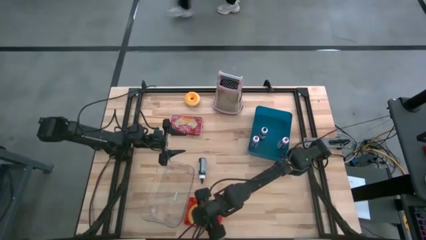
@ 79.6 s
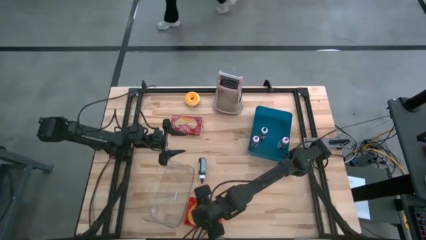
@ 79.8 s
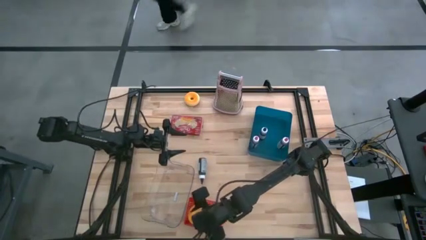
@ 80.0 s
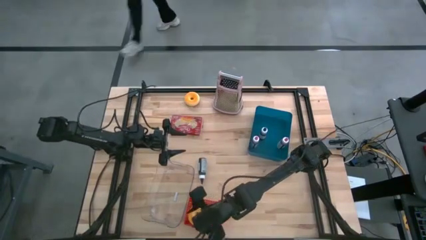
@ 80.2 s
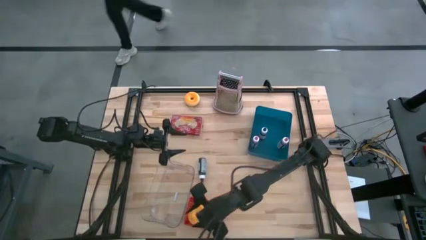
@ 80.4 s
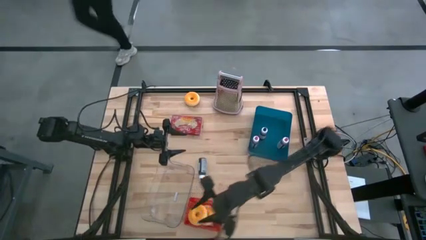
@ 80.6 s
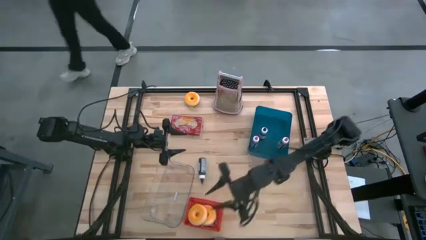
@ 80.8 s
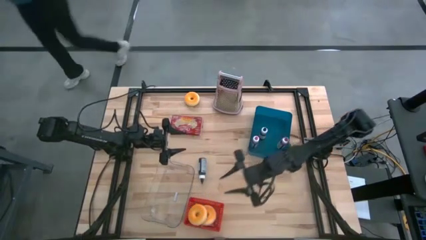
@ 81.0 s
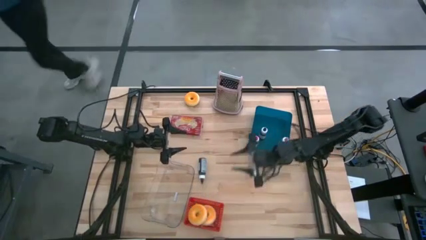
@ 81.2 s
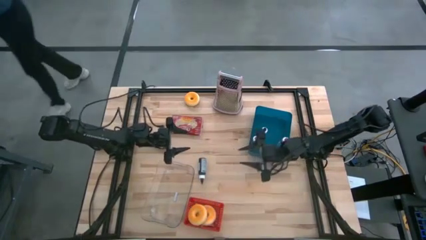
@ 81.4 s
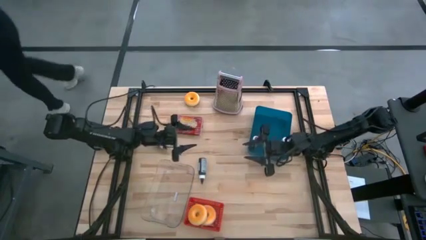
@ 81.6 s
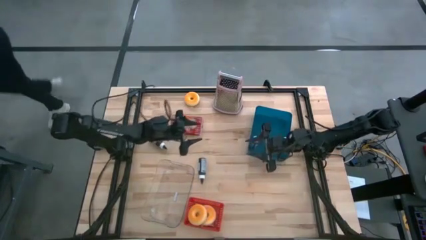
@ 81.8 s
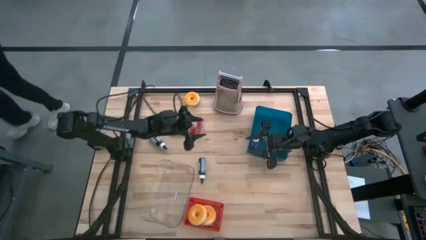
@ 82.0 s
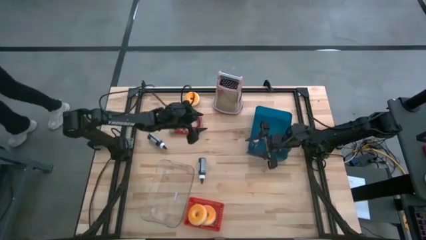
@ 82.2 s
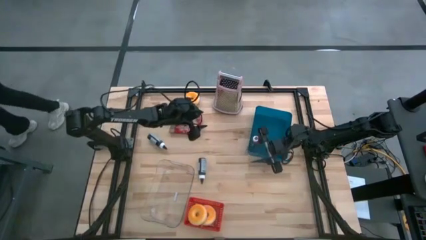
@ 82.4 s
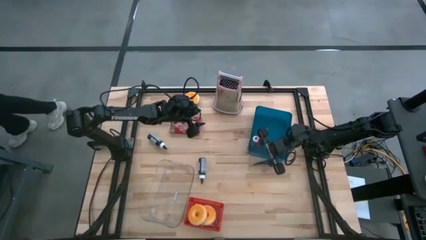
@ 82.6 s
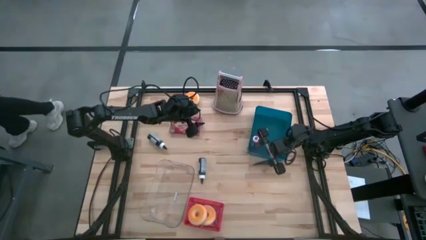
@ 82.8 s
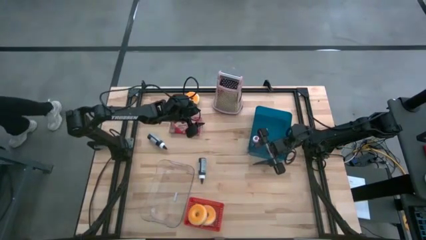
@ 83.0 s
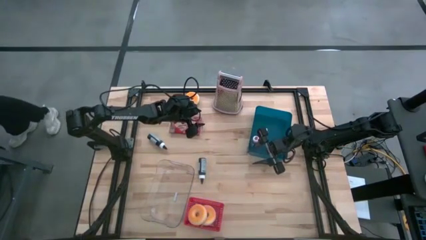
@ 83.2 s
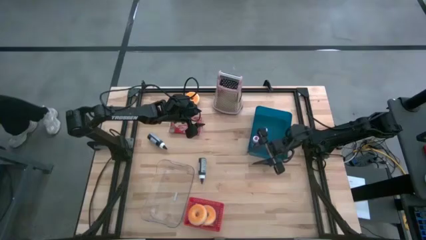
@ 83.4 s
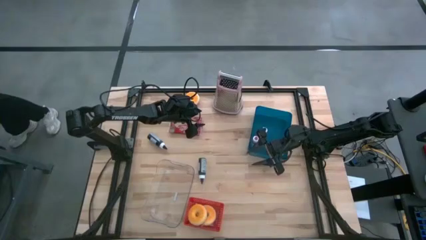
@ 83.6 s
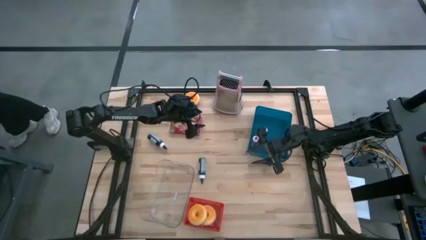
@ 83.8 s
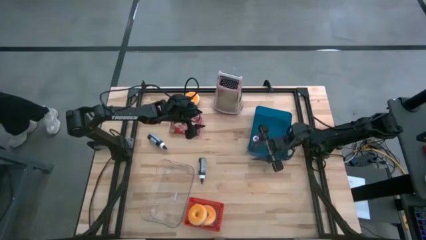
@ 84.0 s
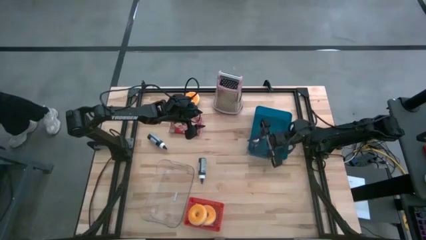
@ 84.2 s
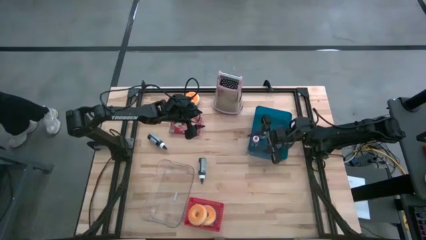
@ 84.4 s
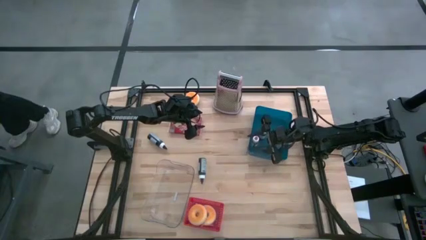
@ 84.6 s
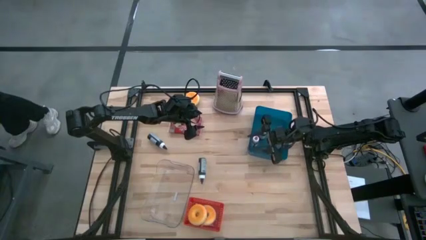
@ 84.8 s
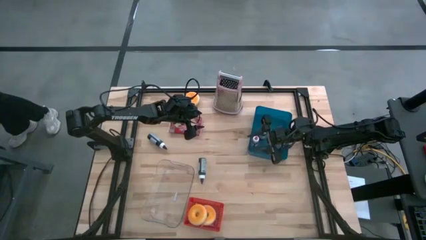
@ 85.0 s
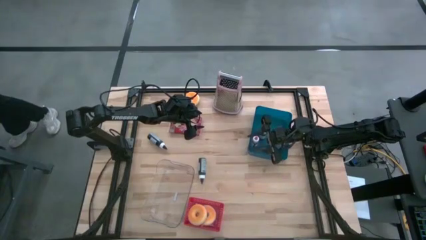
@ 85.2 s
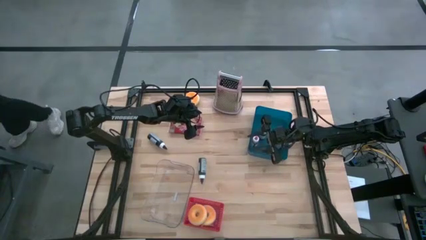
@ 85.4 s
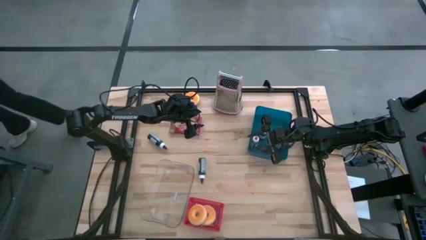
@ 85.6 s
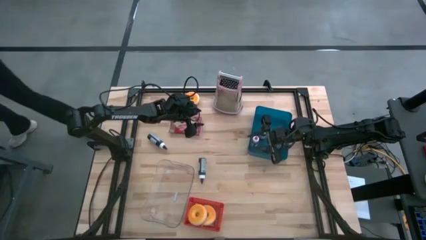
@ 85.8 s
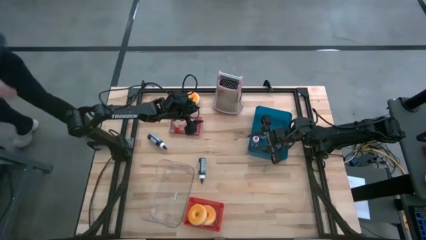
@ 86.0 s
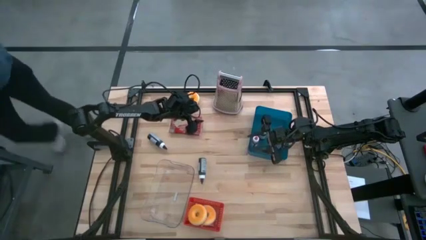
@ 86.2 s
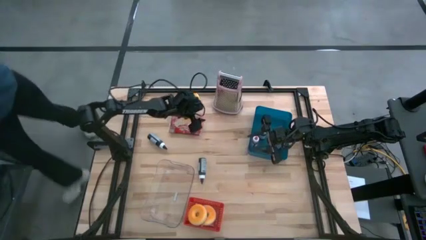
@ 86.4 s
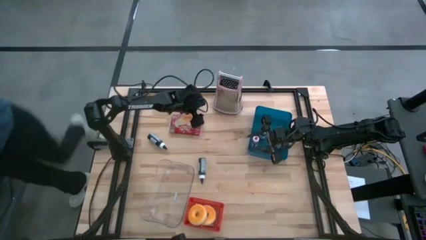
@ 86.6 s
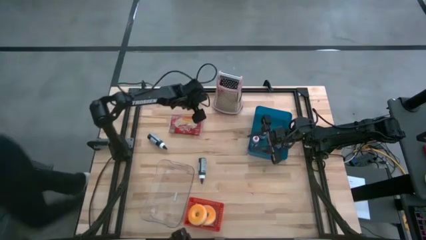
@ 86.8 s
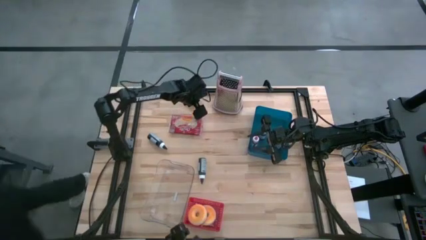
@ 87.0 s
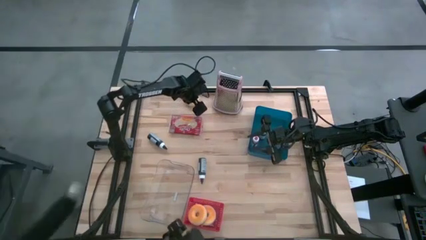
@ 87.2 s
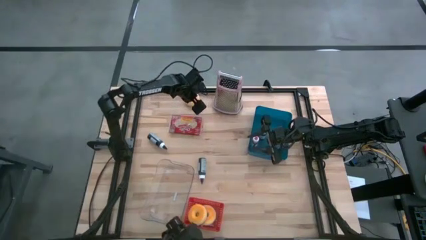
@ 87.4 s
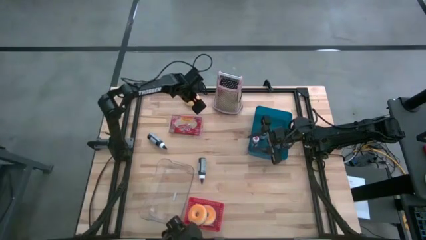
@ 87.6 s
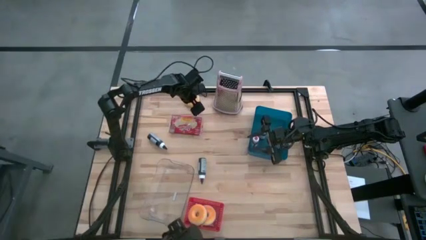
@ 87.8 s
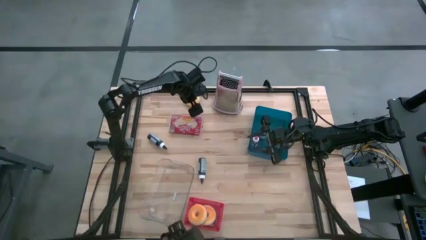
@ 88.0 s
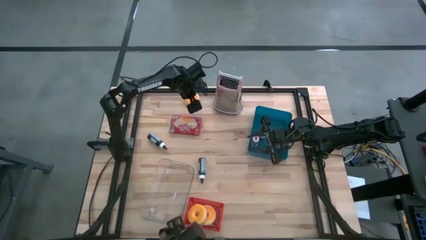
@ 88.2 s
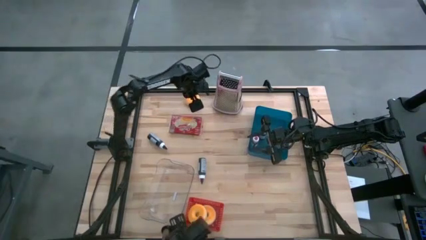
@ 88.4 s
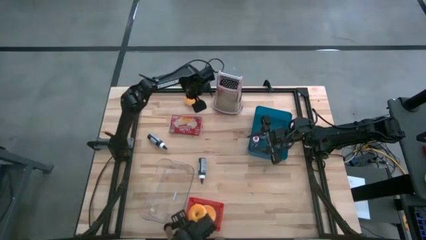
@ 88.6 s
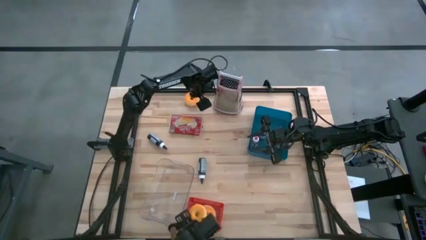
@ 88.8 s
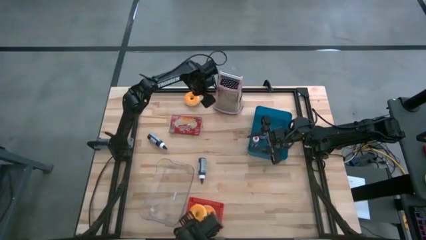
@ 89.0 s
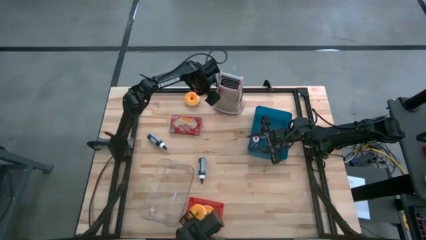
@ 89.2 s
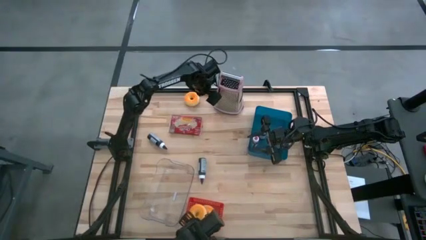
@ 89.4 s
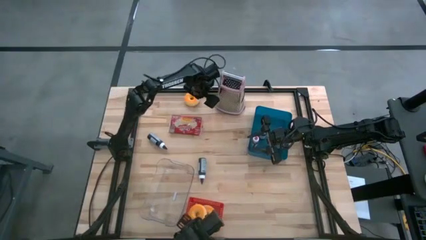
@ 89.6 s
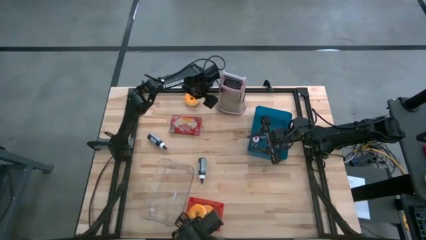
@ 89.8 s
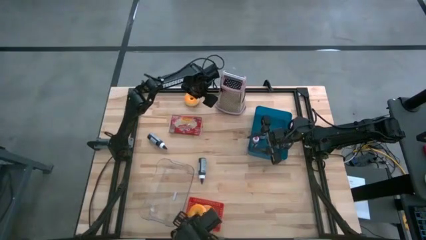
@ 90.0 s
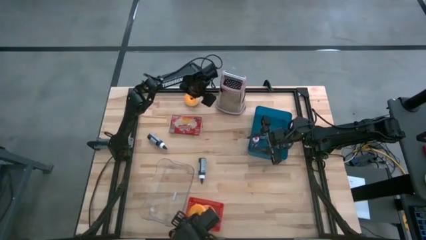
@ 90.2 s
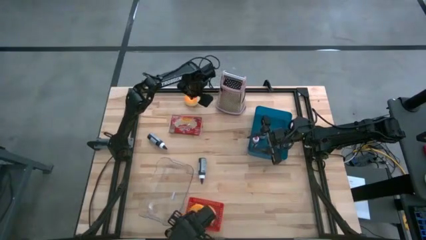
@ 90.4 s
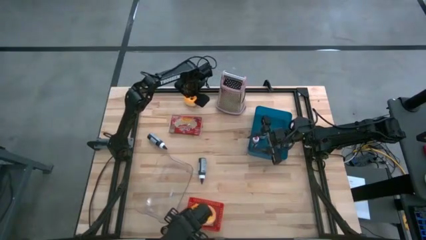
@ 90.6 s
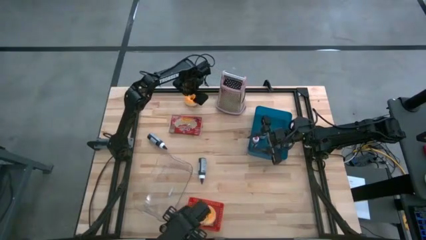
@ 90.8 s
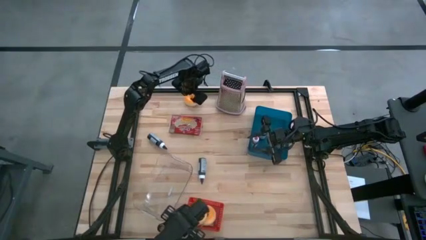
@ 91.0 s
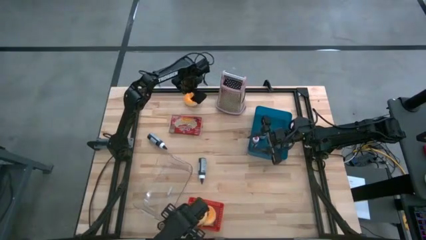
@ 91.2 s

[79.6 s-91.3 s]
Task: Pick & Place Food Item
Put the orange donut into the red bin

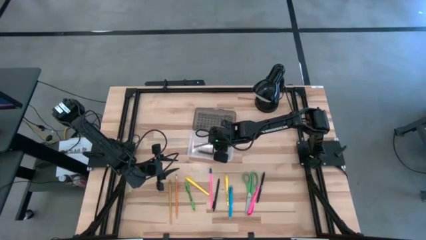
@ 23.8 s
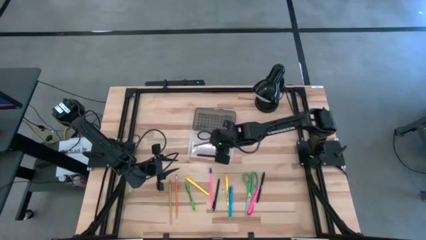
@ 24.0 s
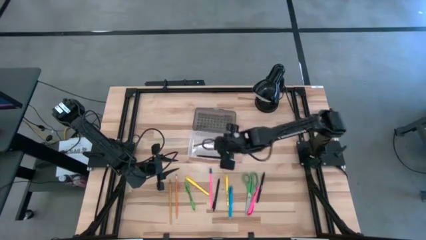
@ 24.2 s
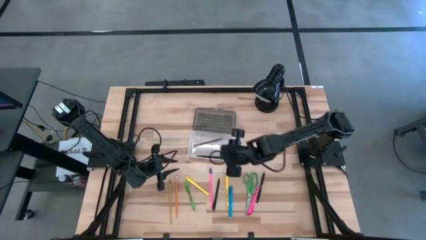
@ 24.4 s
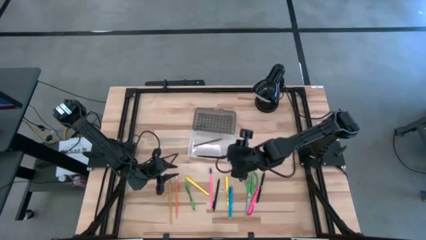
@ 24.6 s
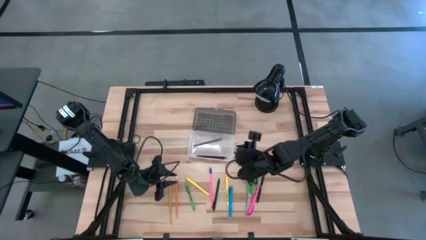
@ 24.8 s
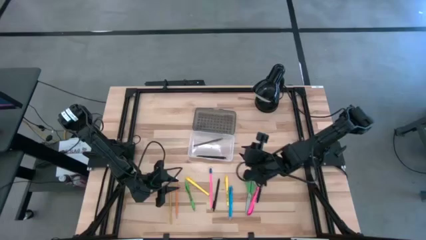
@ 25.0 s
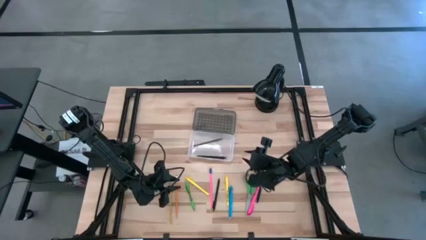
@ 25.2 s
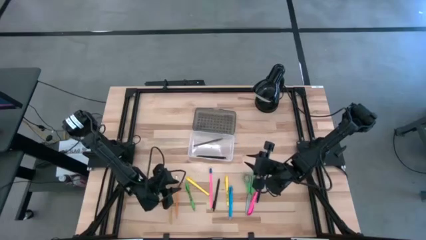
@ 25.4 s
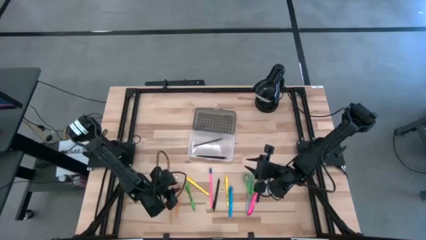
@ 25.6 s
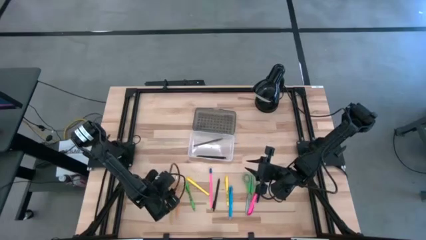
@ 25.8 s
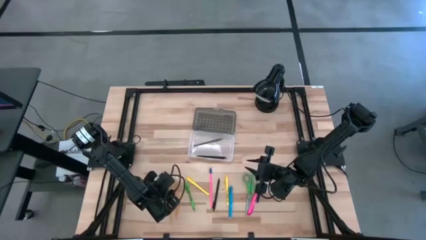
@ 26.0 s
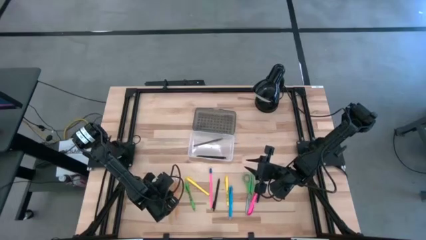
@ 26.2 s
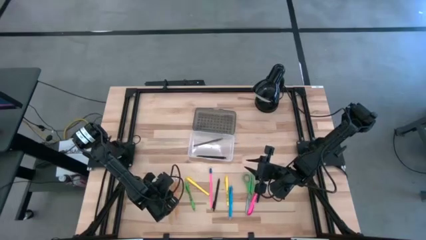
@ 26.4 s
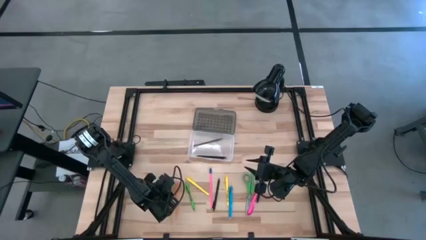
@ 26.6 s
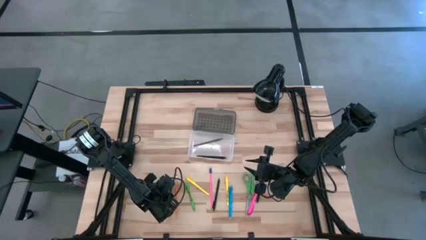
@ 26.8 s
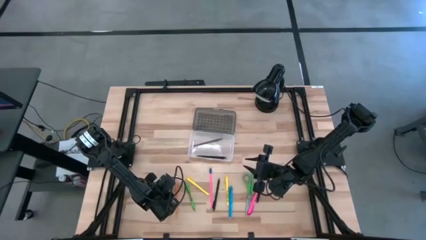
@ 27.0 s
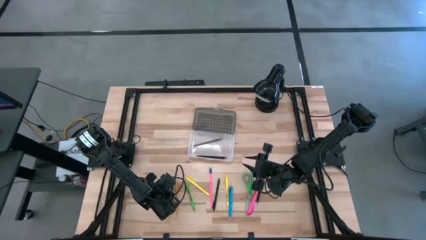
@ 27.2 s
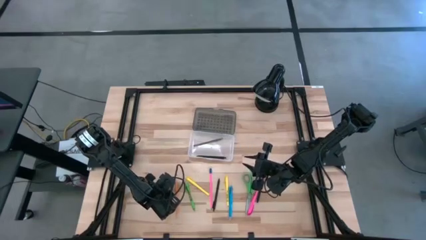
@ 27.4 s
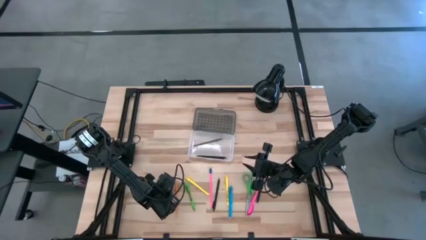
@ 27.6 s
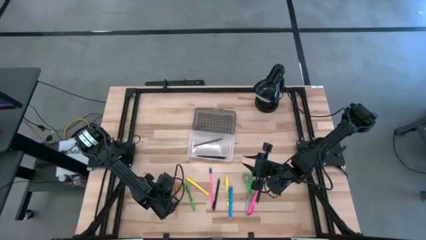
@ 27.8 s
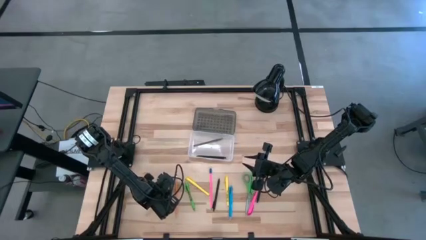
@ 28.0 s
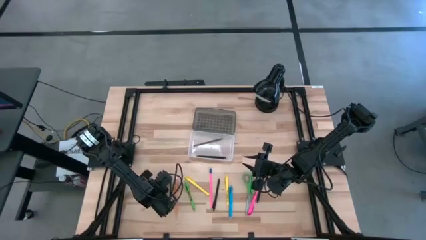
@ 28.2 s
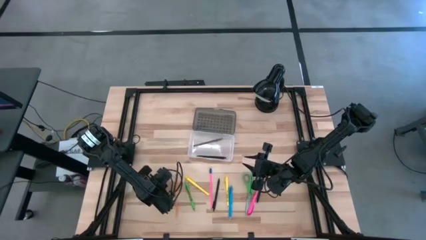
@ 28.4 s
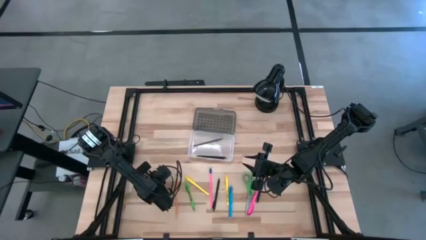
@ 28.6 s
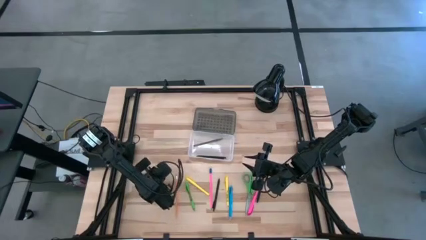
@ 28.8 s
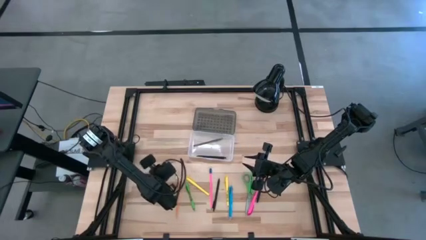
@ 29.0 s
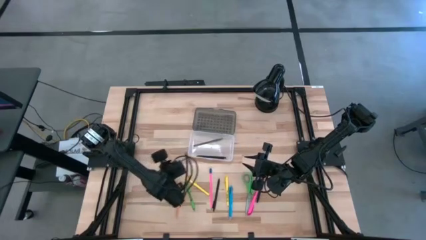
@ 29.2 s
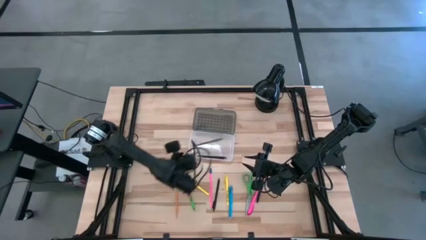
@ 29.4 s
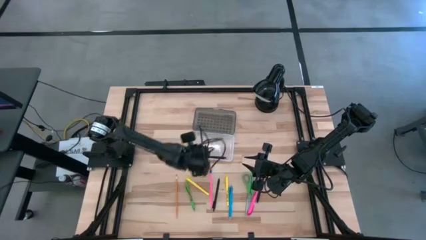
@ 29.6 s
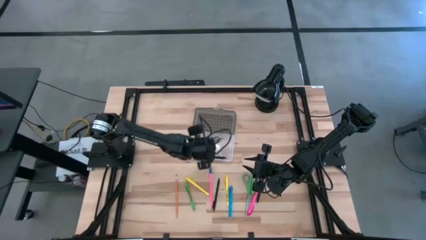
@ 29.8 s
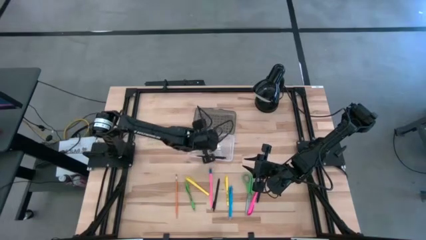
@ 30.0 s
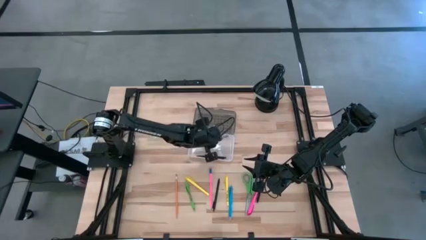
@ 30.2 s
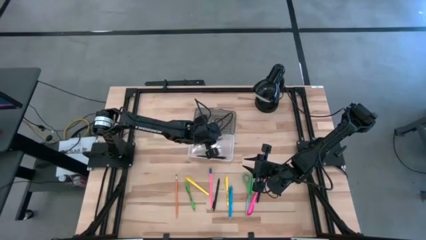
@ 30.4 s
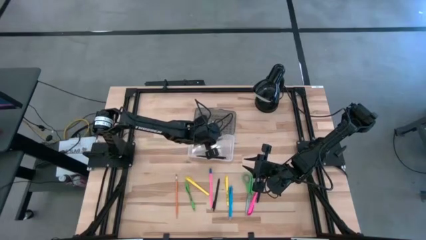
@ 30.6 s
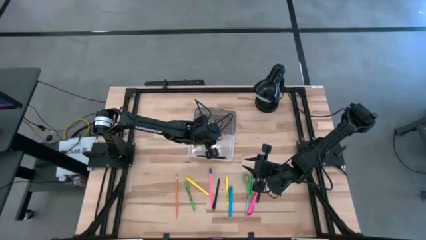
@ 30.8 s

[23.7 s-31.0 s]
Task: Pick & place school supplies into a supply box
Put the yellow pencil into the transparent supply box
